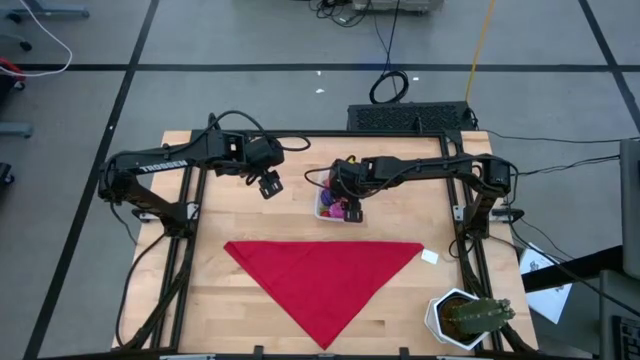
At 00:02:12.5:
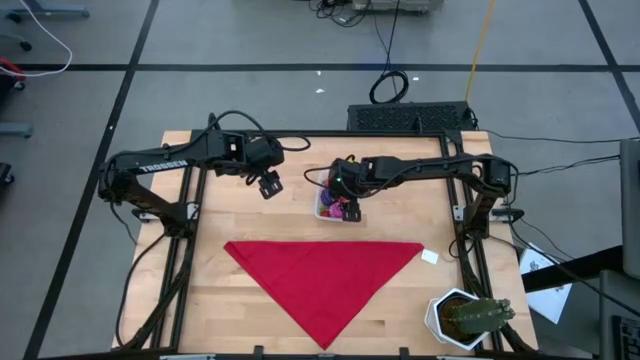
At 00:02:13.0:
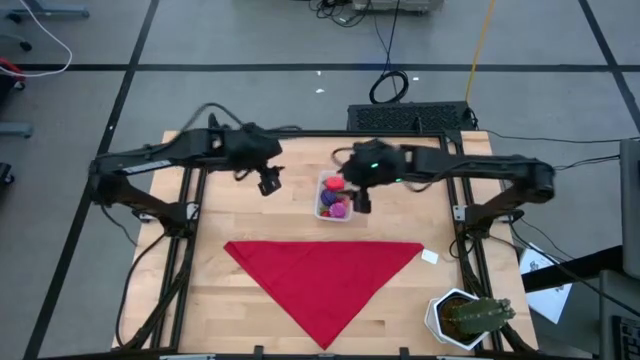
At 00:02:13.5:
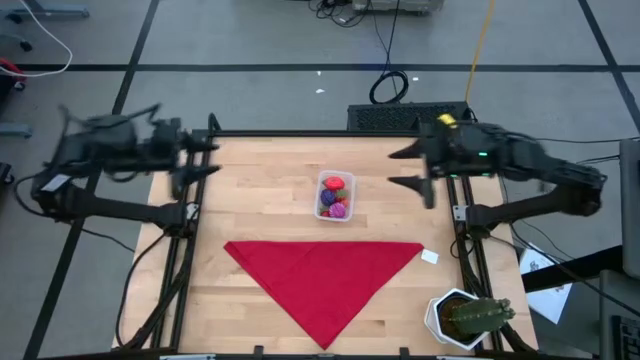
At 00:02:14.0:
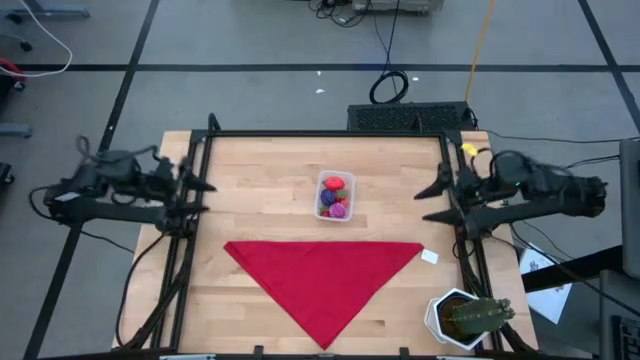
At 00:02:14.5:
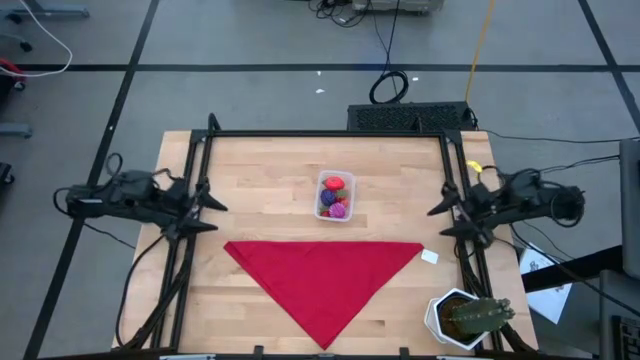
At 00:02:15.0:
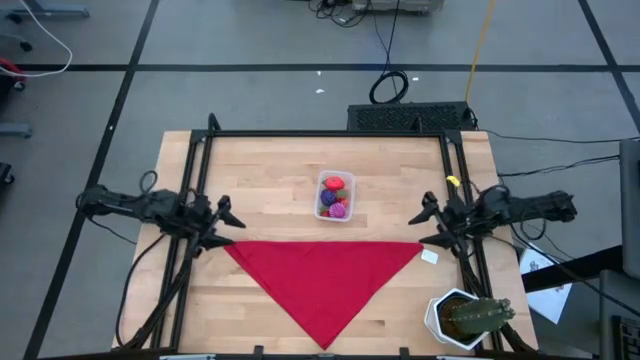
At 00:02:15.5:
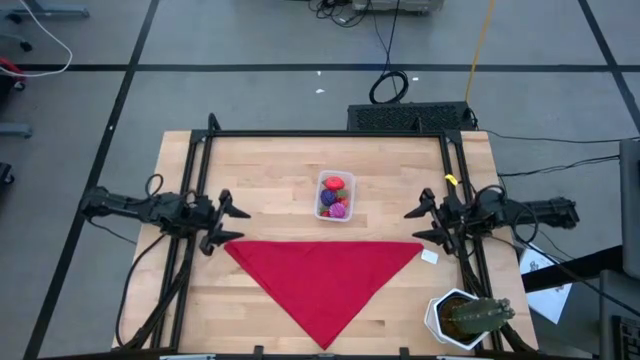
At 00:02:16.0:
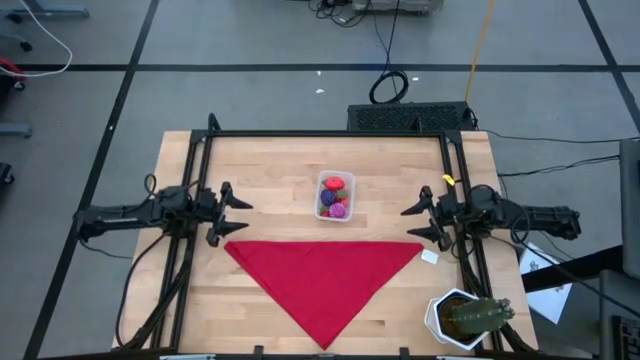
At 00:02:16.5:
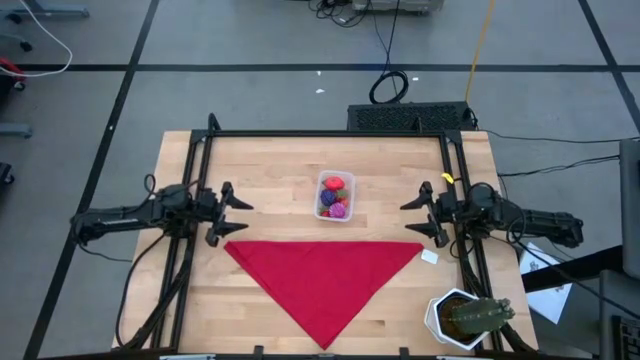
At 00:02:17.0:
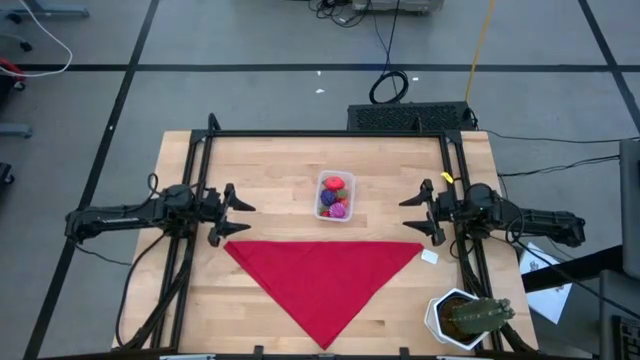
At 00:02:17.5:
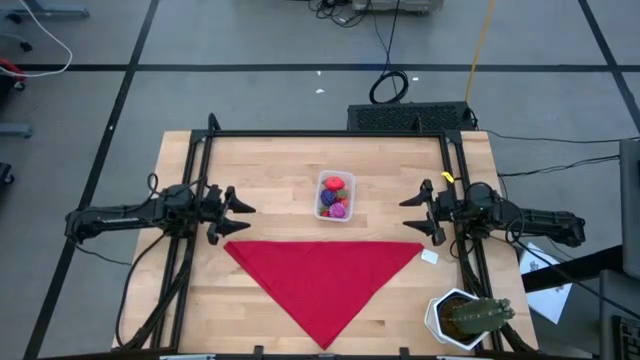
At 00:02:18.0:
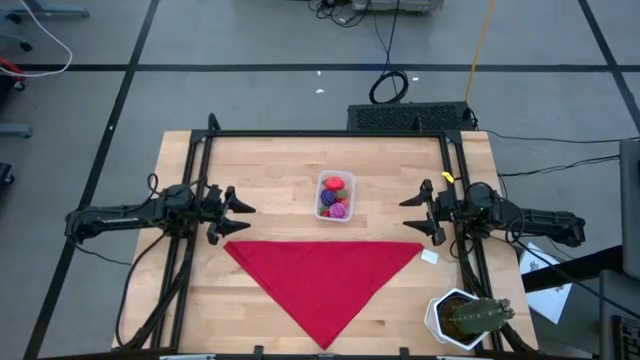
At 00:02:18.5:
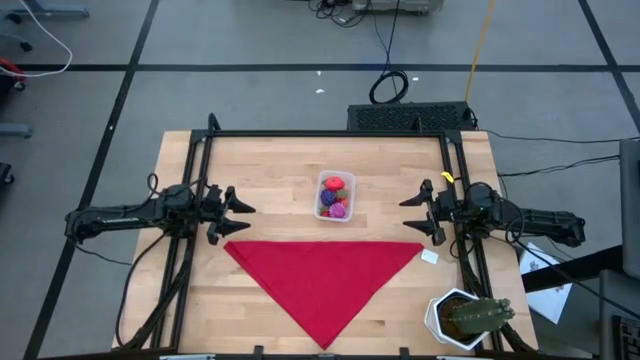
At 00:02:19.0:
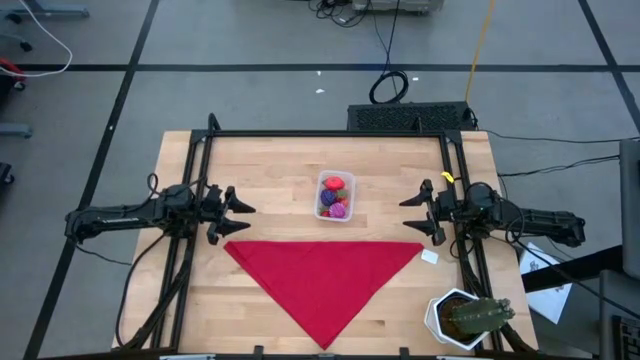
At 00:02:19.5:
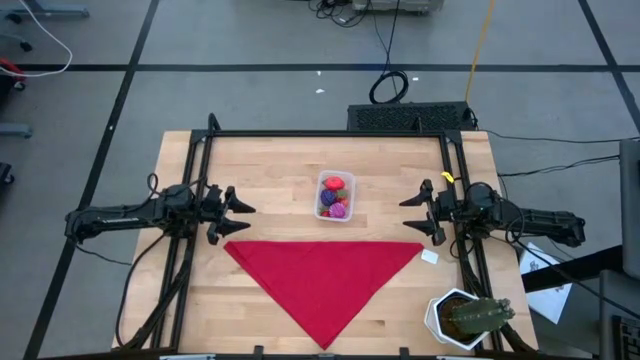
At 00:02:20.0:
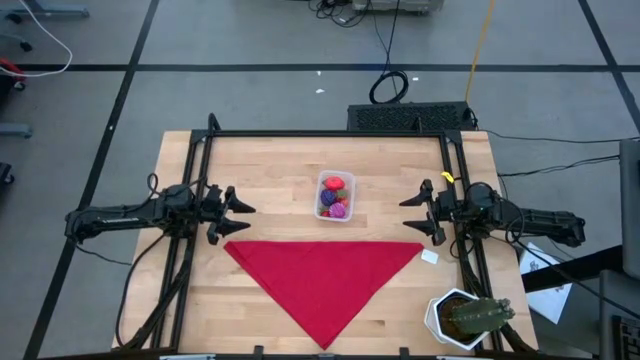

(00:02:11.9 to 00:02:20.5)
Task: Pick and placing Produce into tupperware
Return to Home Position

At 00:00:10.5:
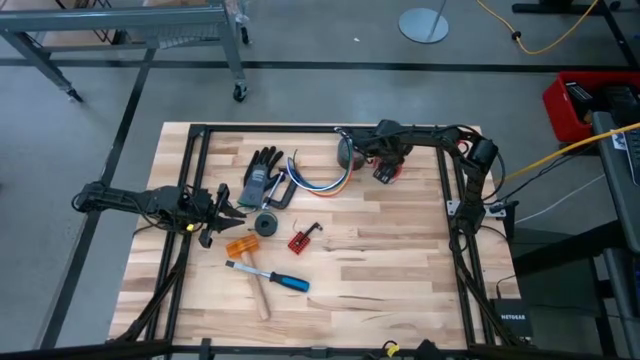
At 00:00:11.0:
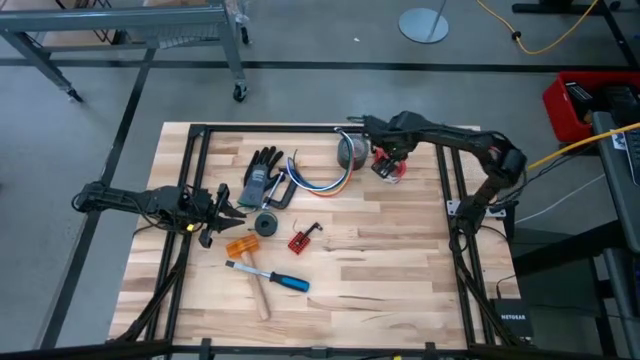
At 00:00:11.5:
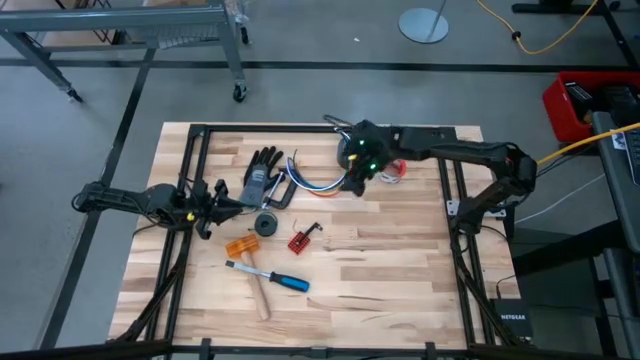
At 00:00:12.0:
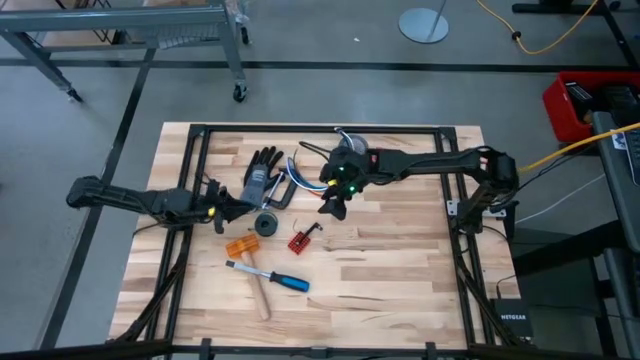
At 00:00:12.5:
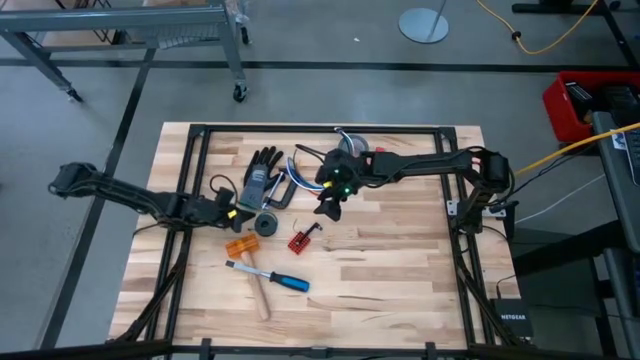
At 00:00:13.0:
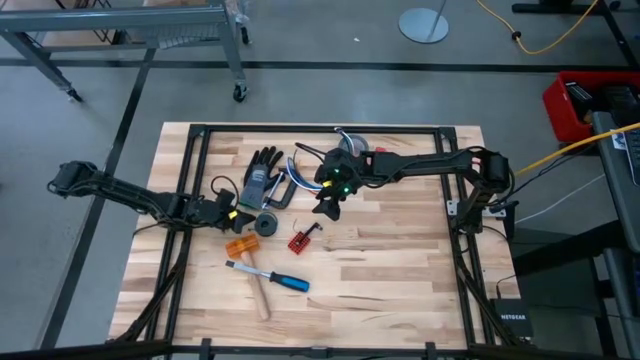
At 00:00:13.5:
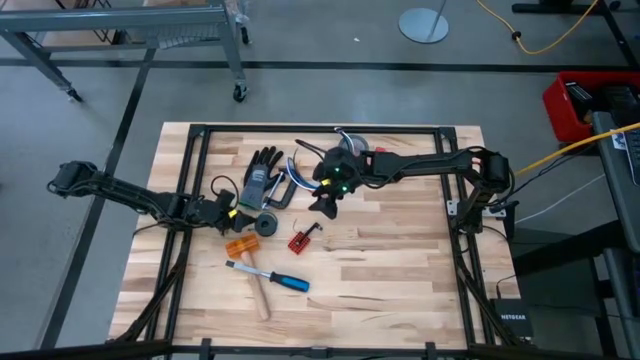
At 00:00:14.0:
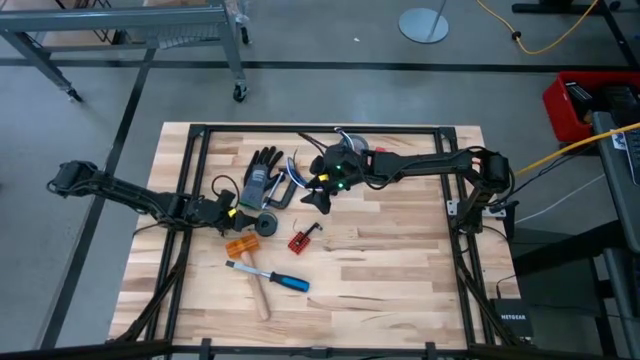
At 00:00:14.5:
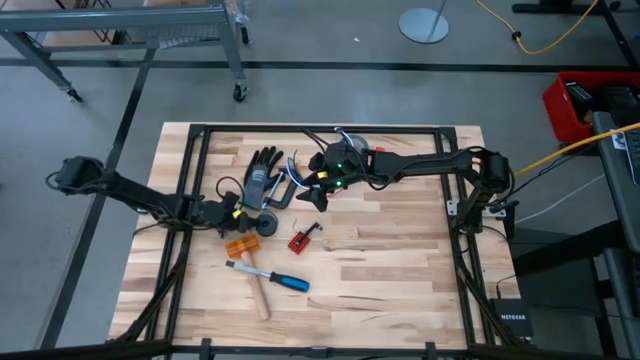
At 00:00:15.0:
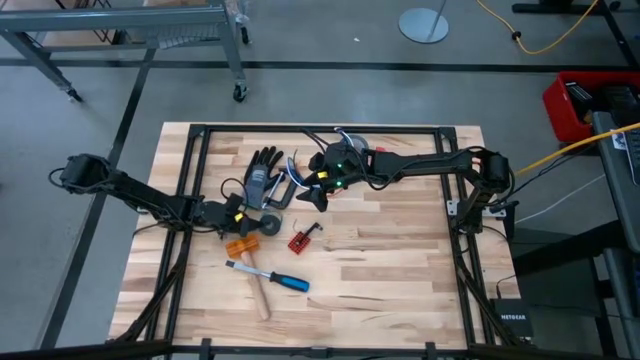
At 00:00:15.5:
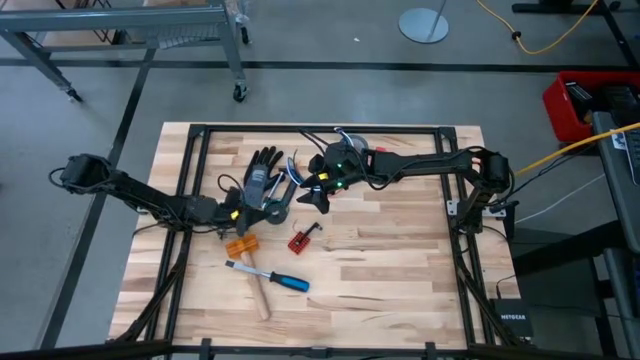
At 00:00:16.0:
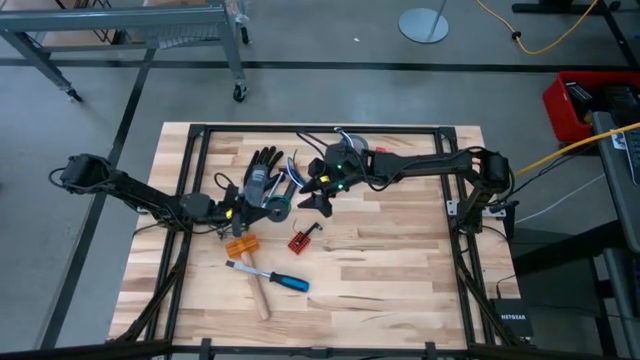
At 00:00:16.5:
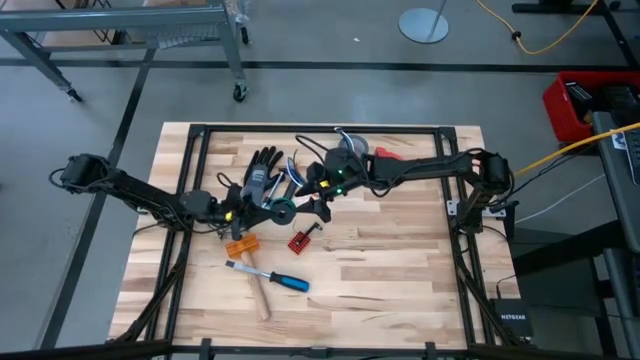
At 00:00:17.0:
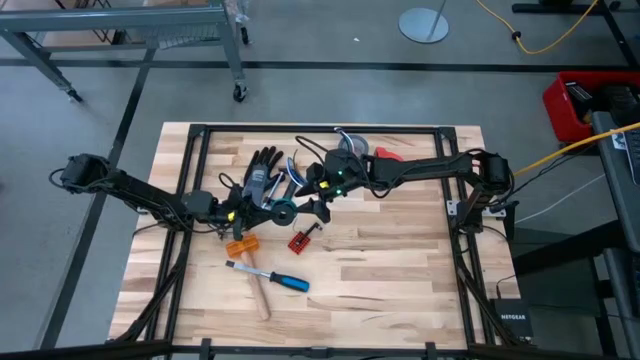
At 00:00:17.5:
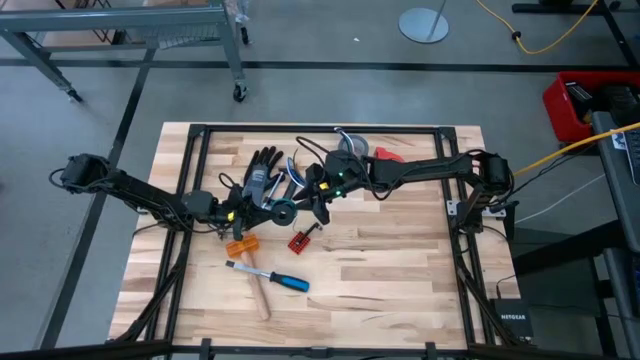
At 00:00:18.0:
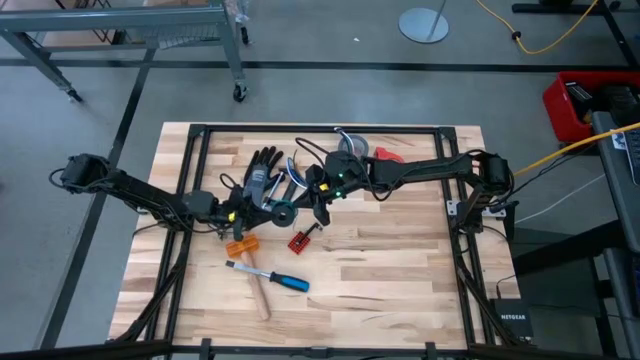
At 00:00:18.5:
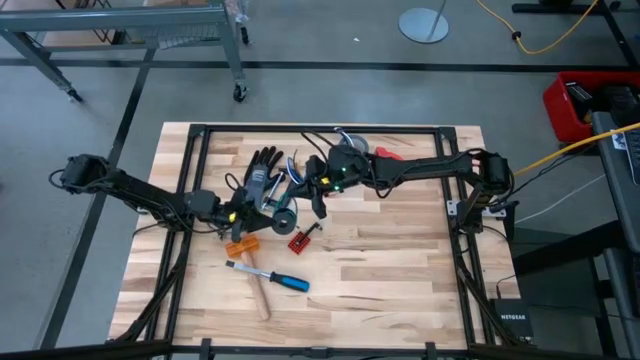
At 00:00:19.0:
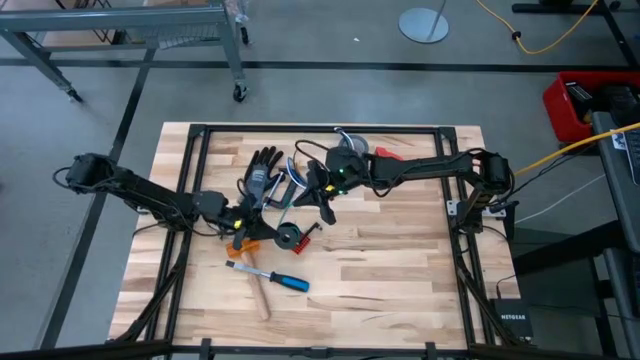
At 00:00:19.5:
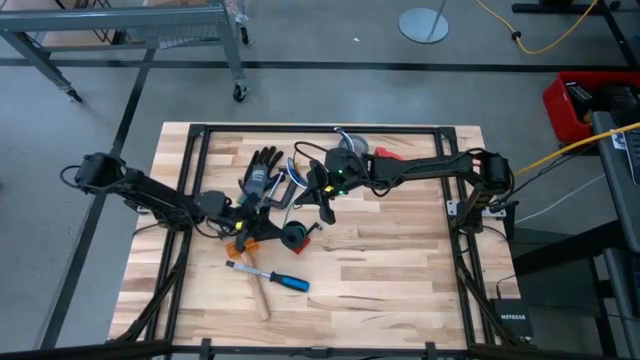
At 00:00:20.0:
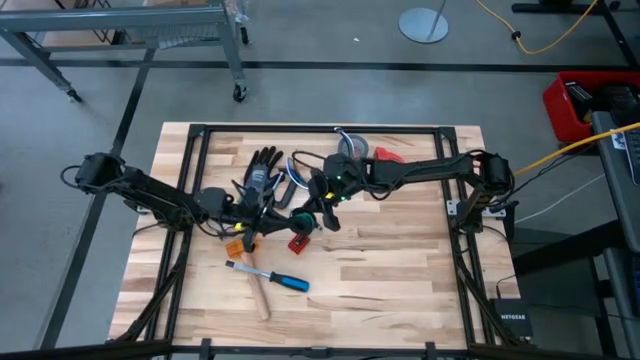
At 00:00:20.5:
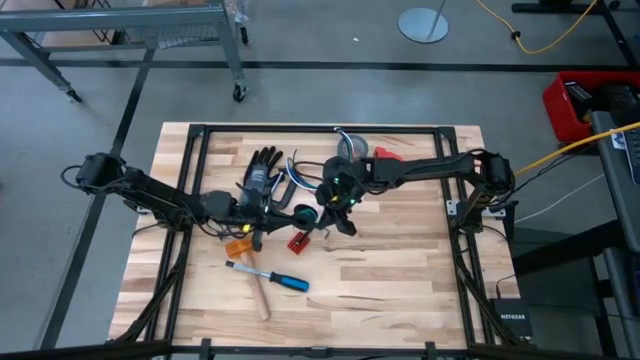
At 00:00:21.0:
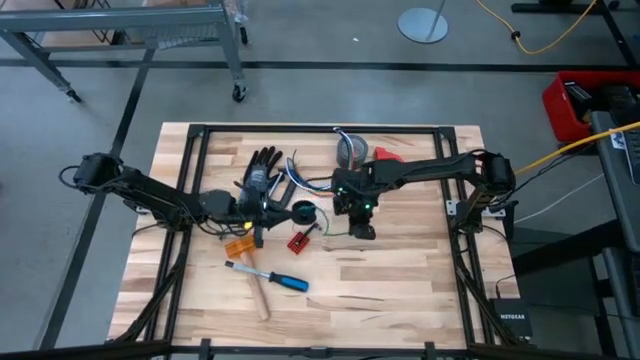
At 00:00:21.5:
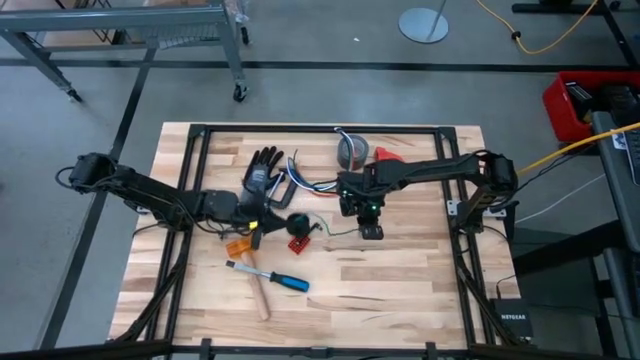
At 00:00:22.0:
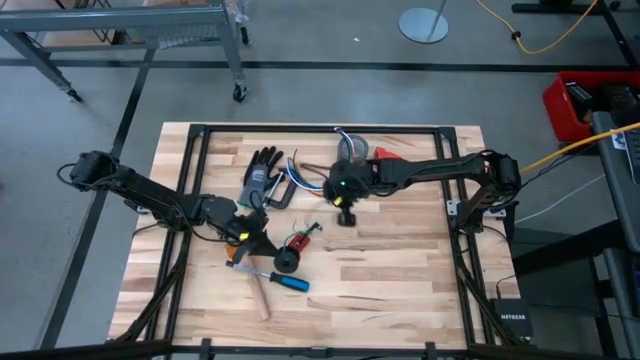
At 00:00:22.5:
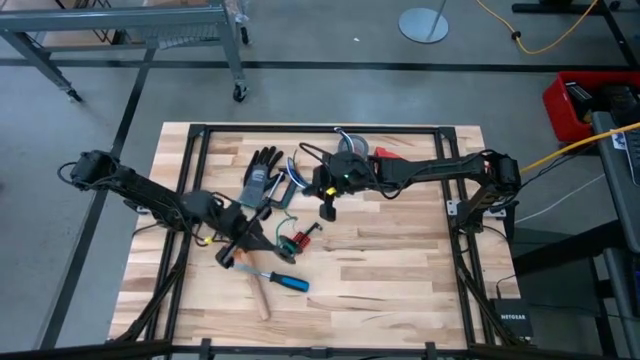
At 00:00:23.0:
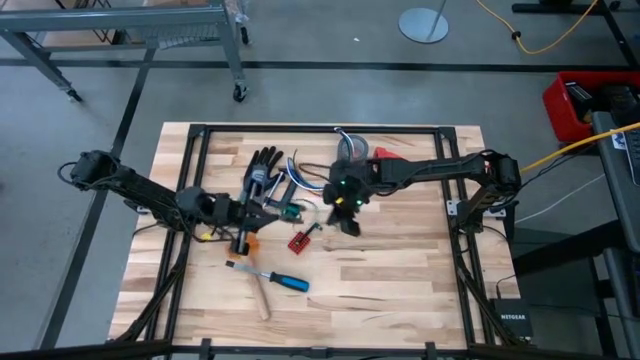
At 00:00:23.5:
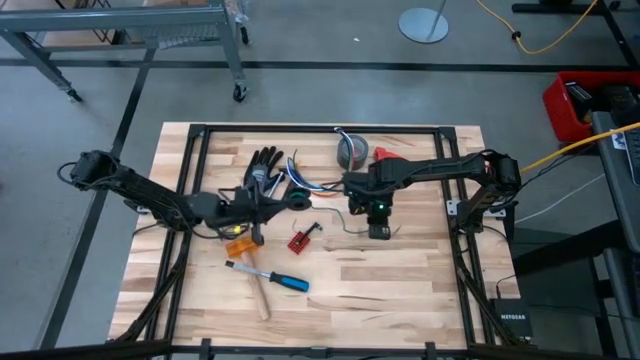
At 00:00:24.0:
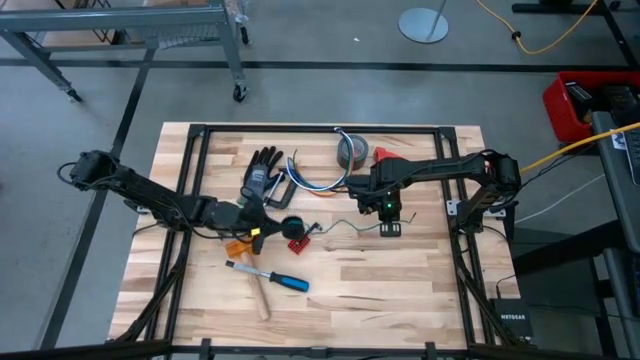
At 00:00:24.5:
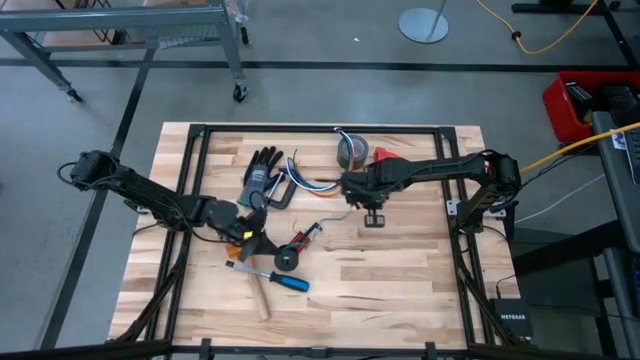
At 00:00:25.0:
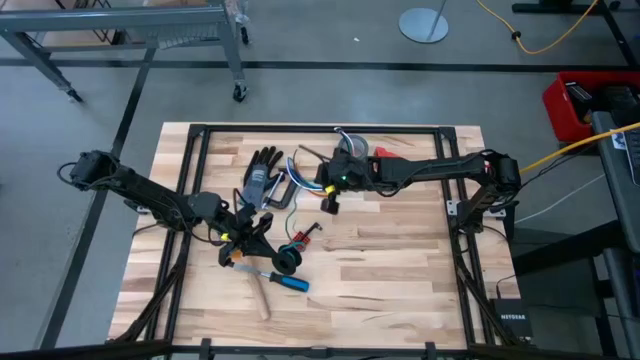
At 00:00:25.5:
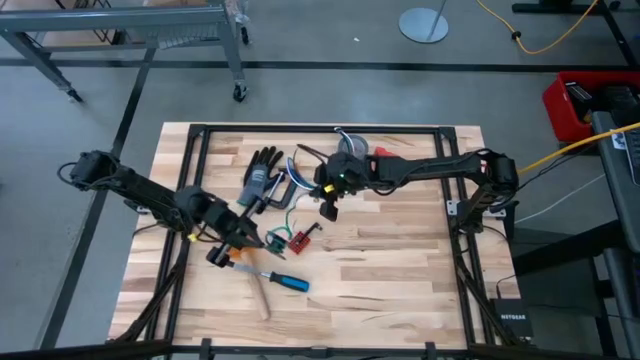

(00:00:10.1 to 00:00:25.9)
Task: Coil cords
Uncoil the green wire from the black spool
